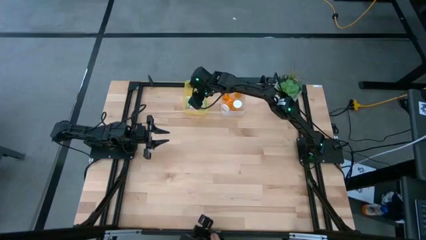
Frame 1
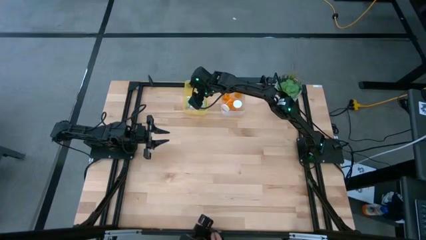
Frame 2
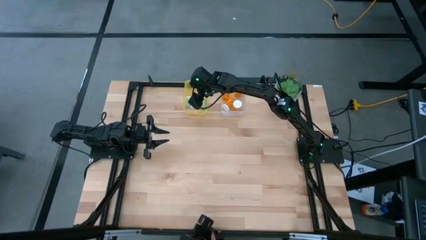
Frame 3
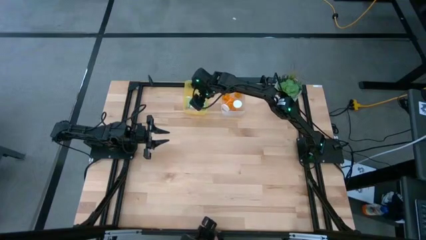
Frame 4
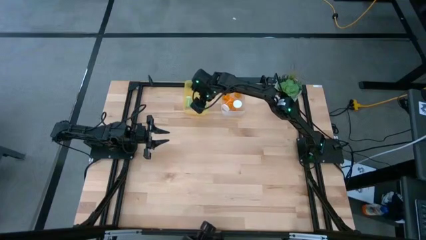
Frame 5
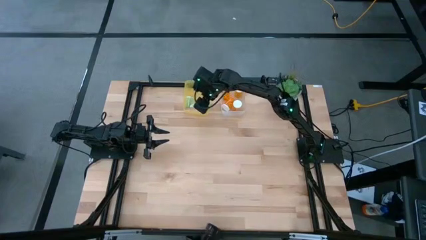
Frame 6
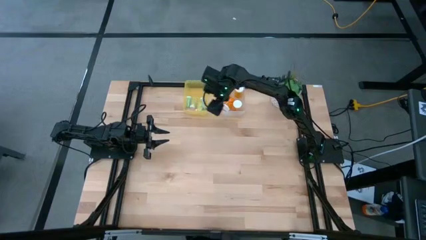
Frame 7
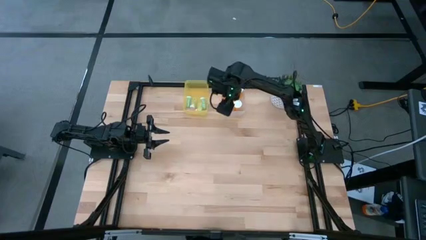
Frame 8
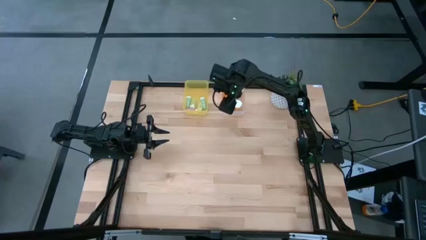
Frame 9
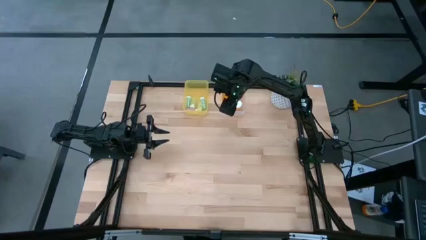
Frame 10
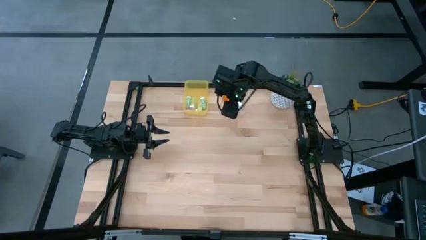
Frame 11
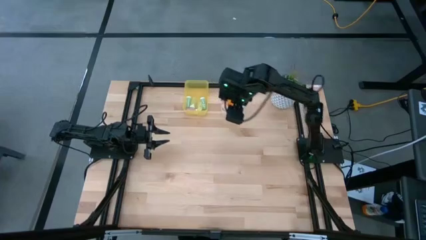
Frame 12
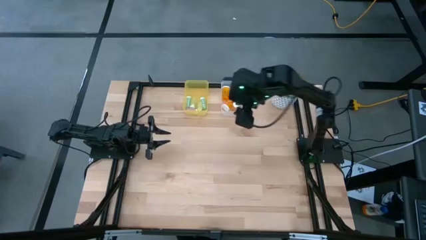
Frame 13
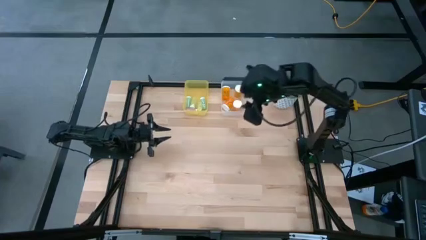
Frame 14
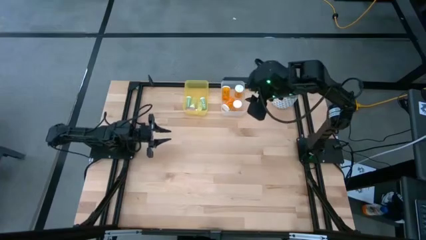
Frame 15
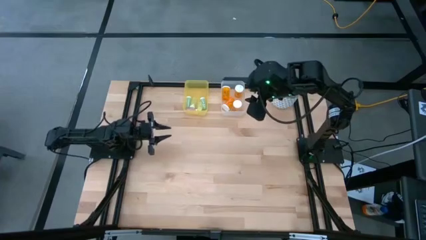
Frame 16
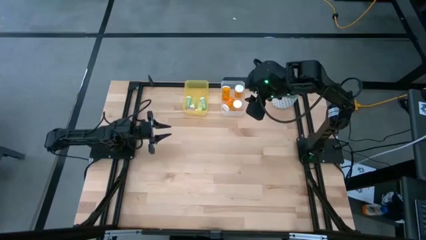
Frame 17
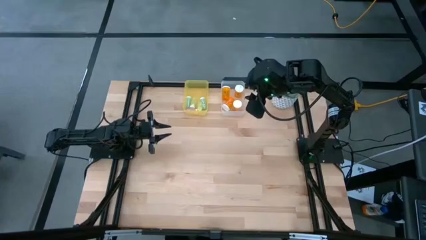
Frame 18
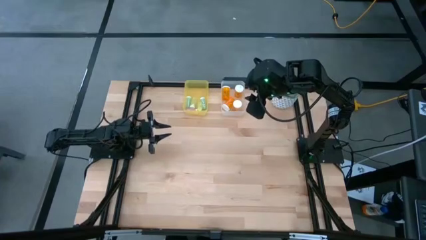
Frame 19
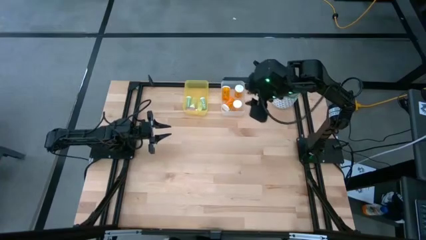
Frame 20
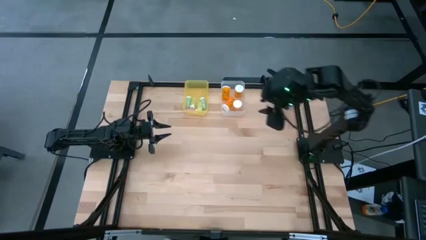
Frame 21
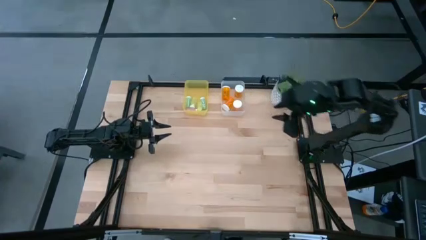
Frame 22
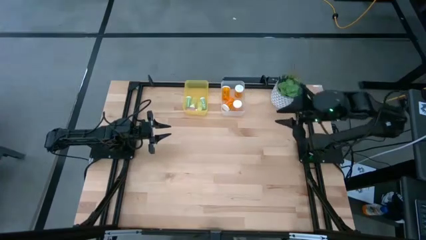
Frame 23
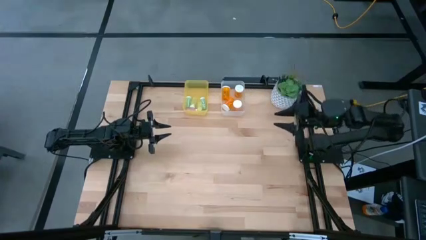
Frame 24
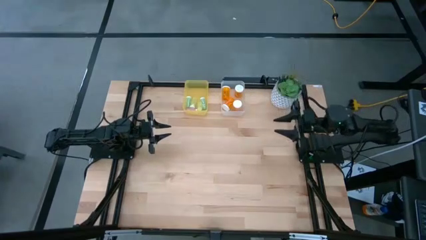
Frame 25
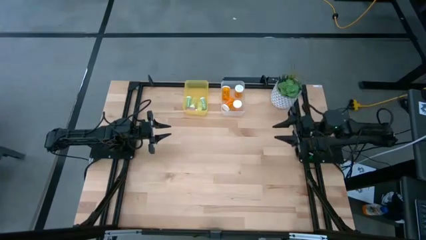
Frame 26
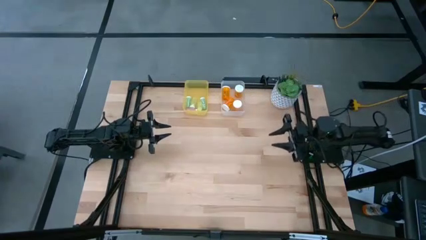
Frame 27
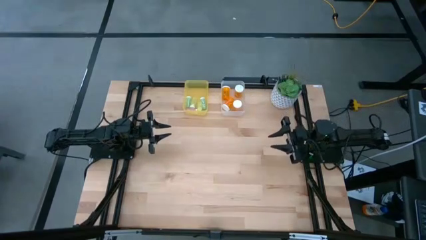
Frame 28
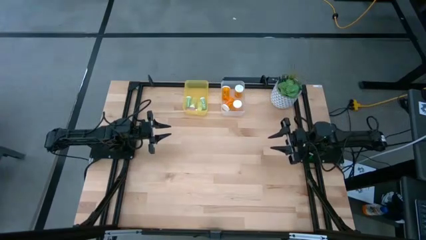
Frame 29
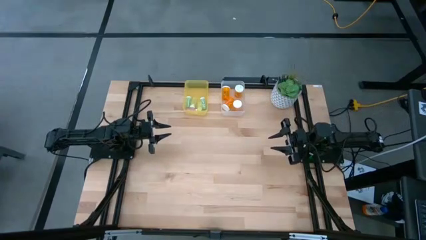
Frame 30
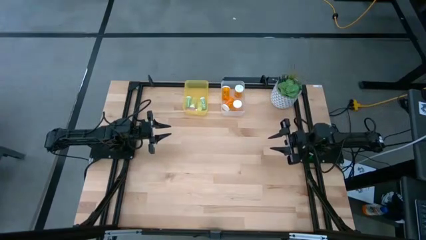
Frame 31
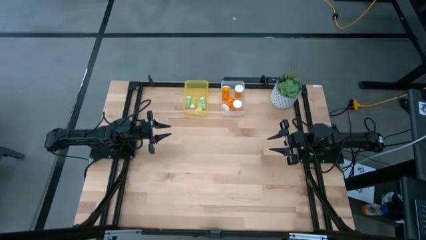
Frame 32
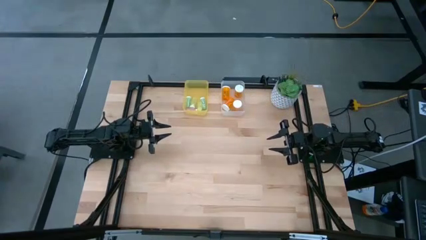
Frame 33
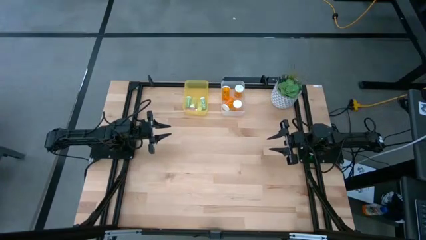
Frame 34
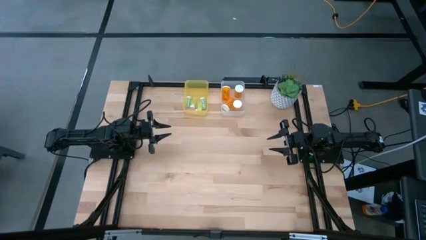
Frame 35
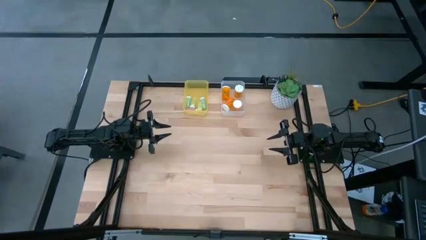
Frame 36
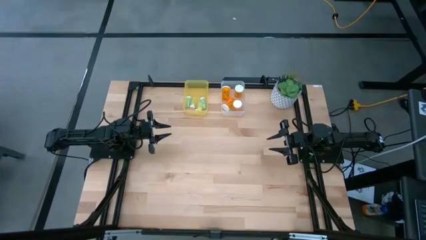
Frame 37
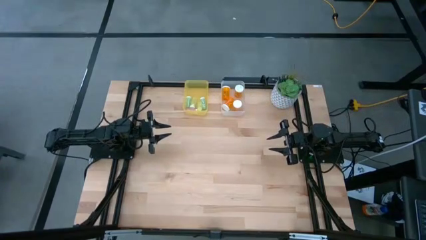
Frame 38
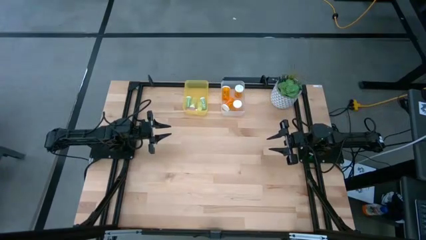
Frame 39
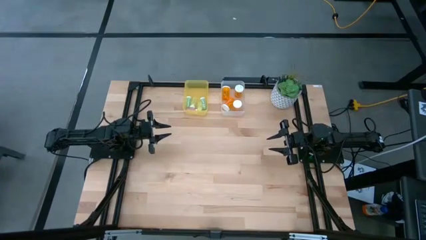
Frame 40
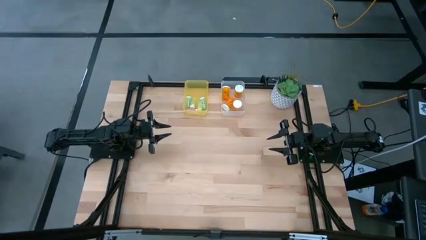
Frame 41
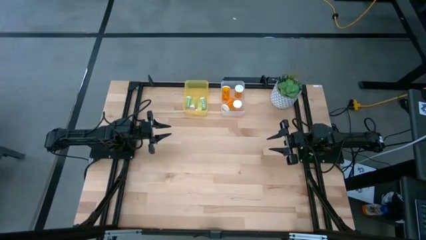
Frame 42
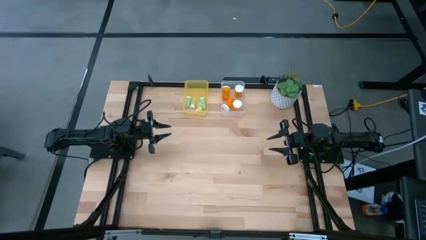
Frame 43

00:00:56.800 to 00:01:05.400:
Task: Pick and place medicine bottles into bin by pill shape (circle, oval)
Return to Home Position

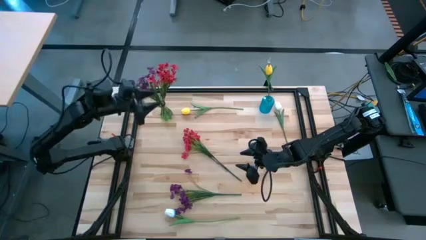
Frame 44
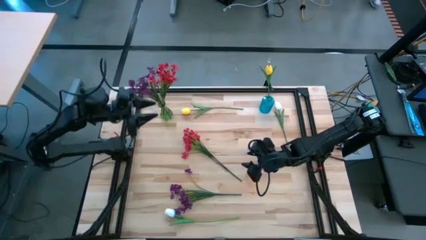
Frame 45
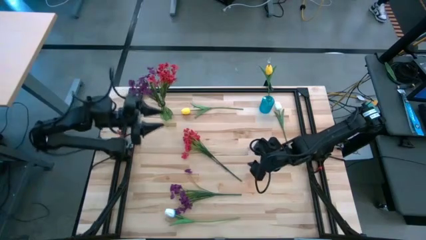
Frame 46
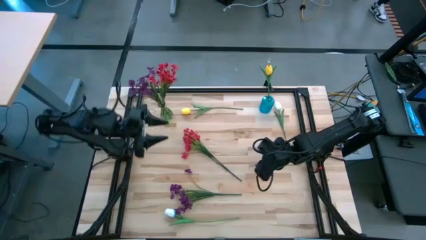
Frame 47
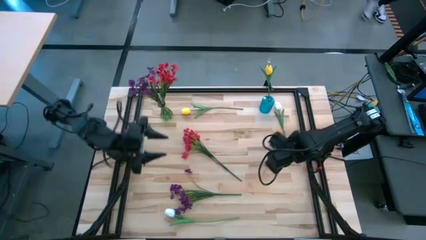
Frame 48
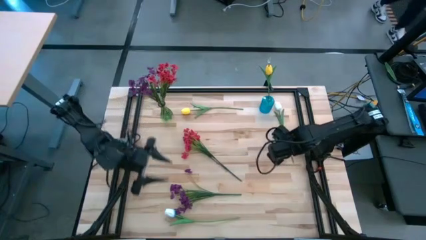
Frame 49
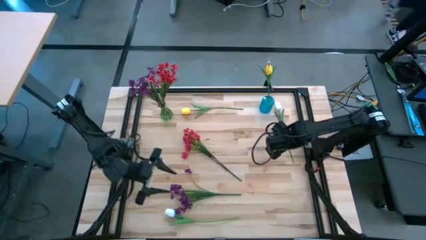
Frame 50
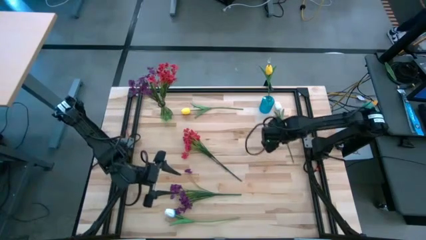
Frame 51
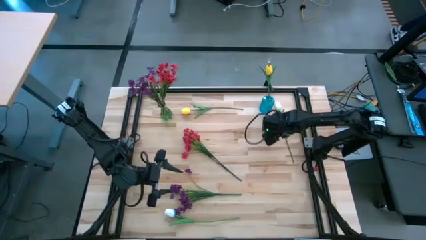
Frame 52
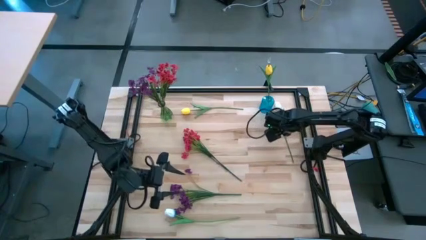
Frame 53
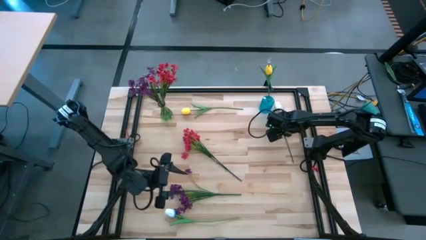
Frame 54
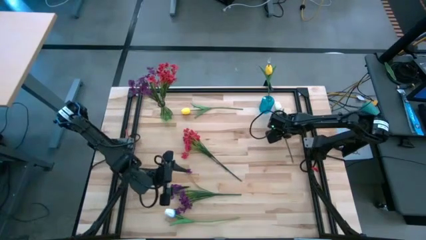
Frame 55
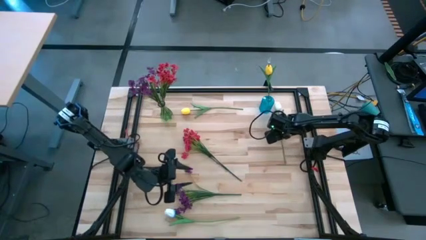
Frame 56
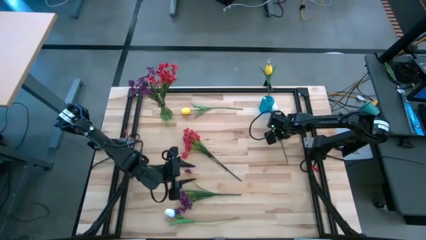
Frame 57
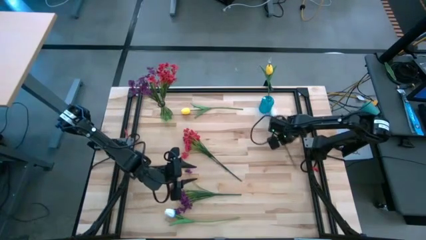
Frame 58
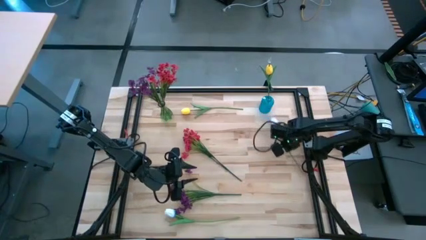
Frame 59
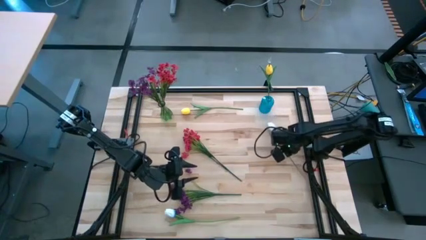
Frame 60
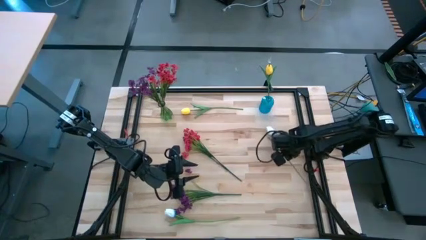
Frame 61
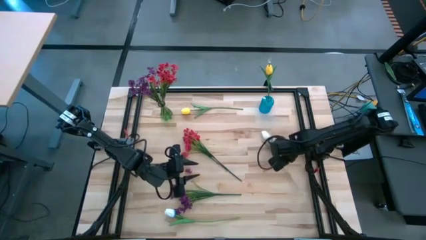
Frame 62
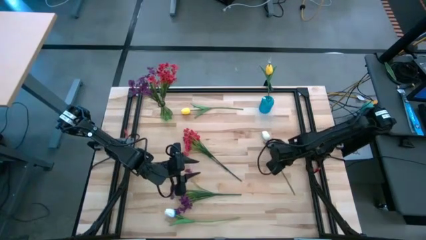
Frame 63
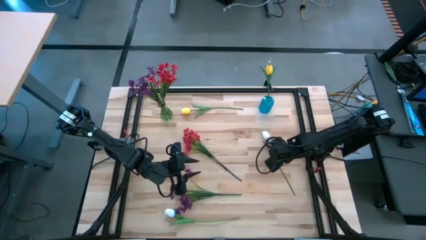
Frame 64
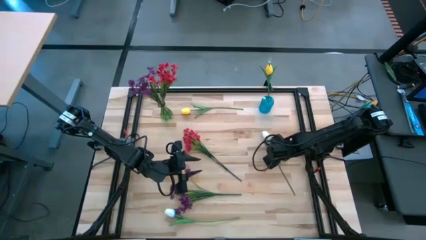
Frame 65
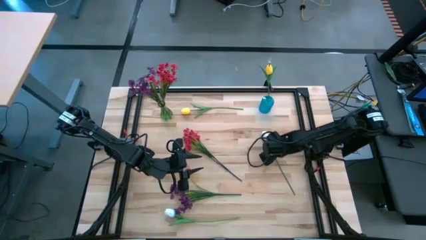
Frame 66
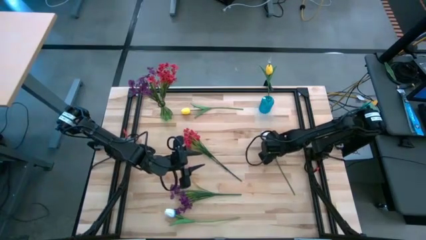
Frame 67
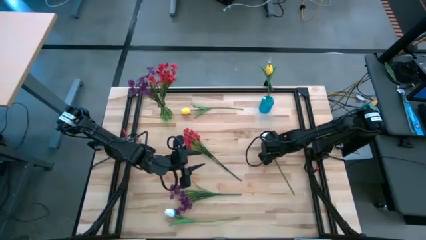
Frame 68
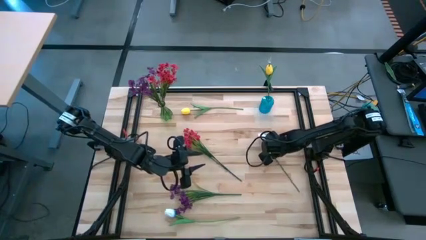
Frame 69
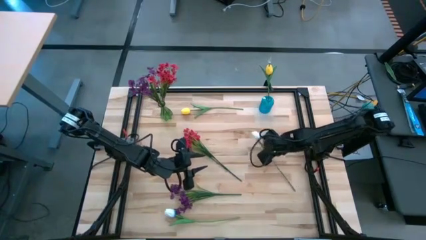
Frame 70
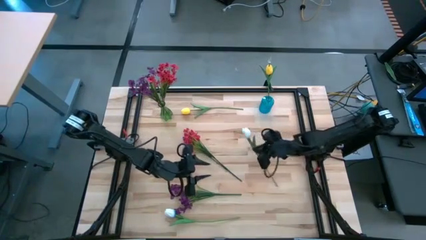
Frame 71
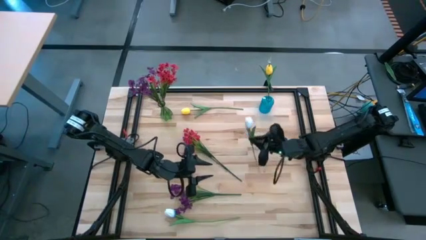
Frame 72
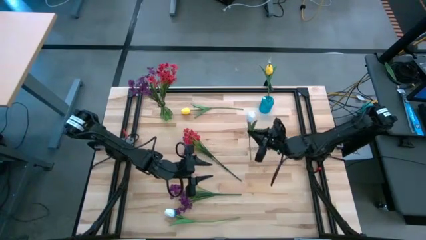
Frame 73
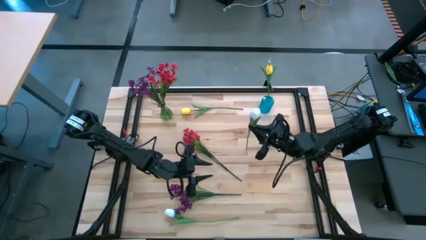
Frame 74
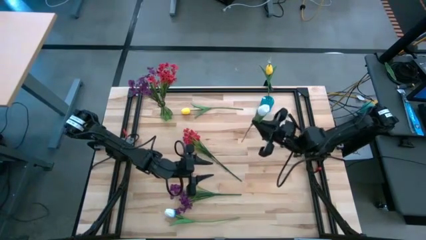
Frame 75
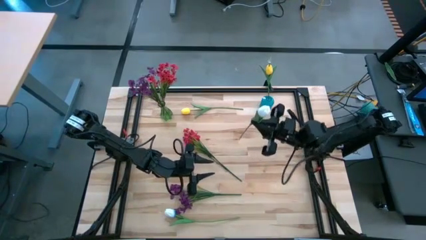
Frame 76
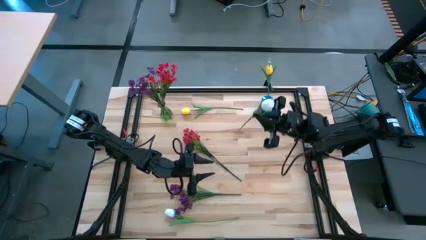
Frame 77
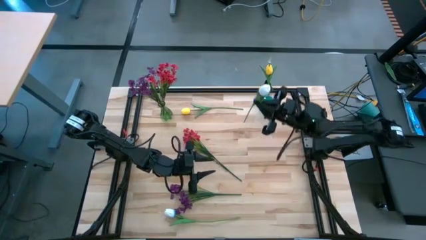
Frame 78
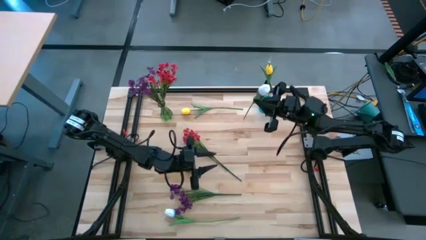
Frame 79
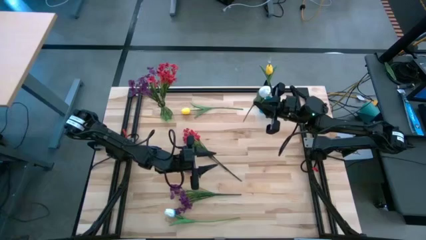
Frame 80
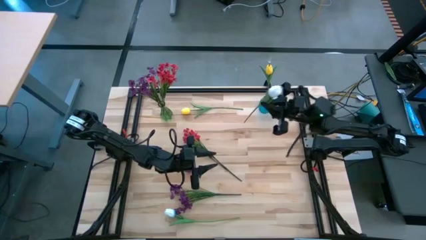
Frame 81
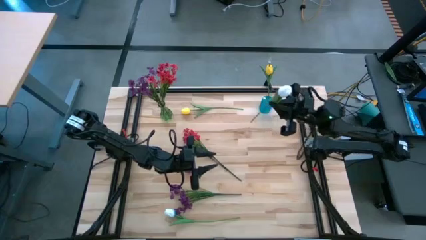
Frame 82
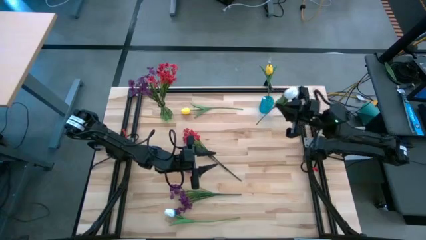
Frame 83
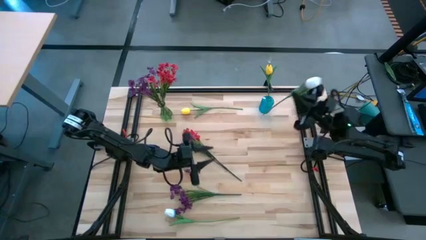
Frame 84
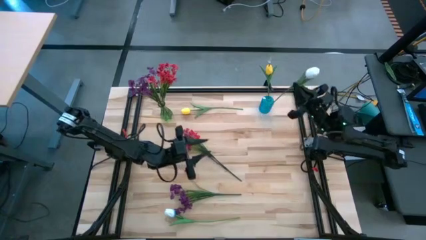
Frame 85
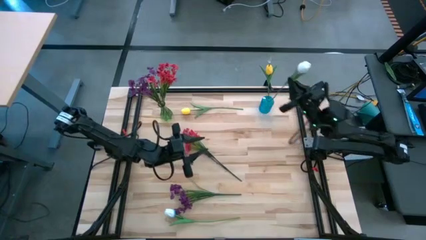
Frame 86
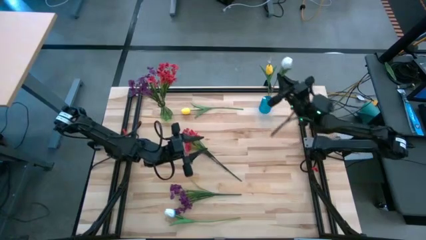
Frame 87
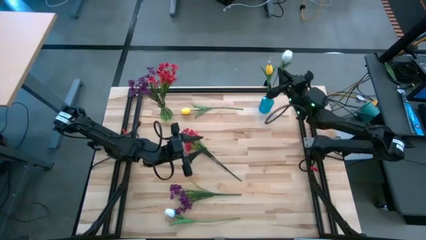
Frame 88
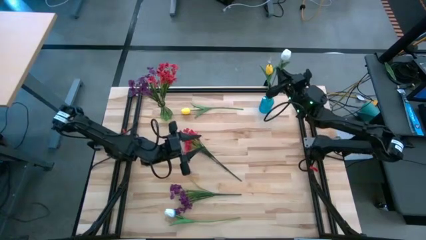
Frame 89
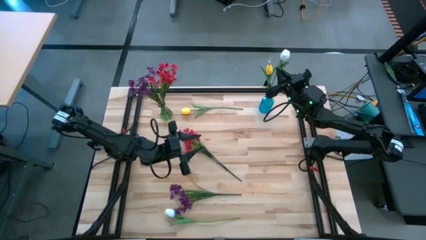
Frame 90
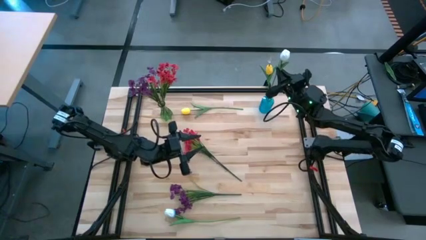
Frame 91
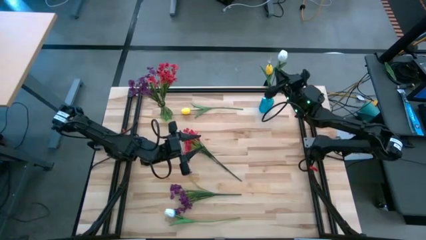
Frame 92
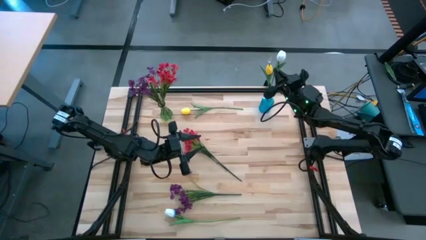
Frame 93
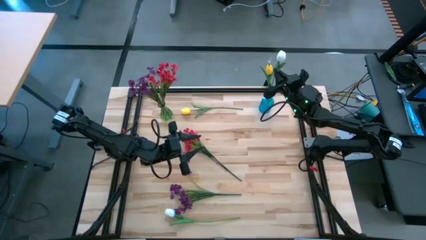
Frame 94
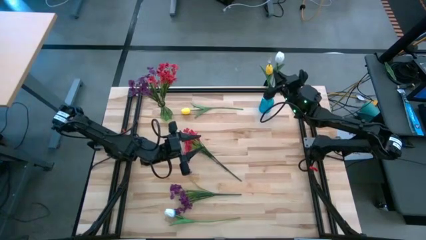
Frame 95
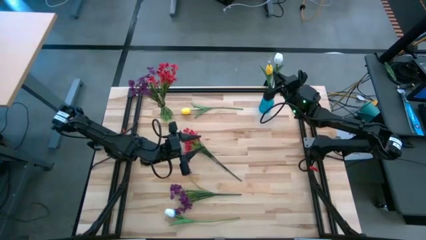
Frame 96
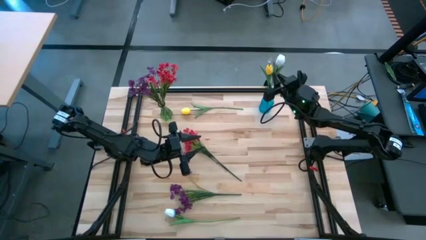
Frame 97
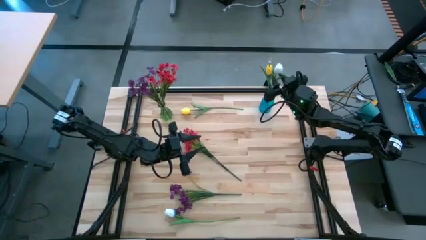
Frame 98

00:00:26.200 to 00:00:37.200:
Task: Sort flowers into vase by color
Put the top white tulip into the blue vase
